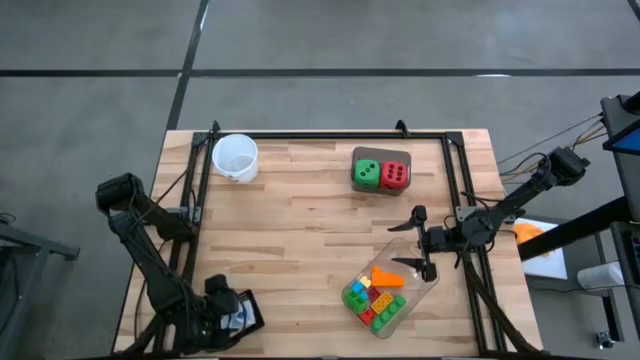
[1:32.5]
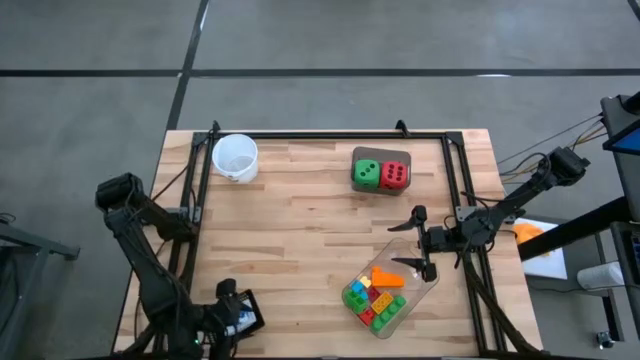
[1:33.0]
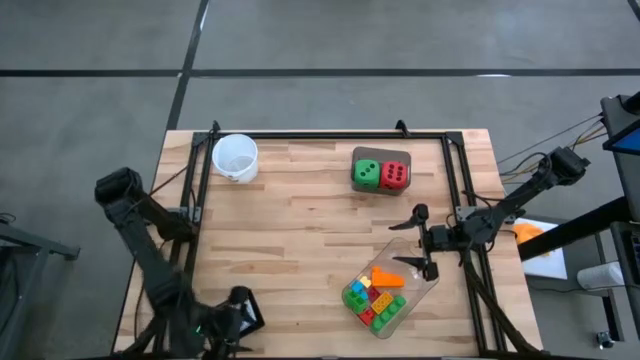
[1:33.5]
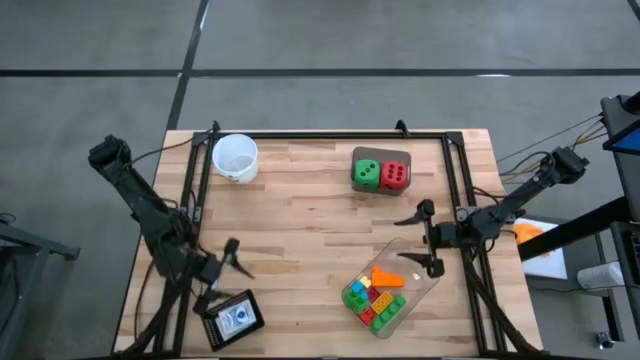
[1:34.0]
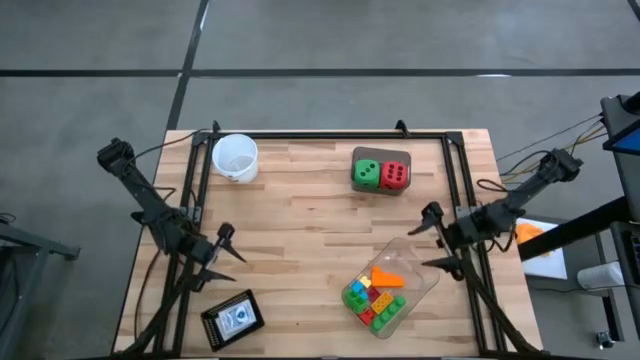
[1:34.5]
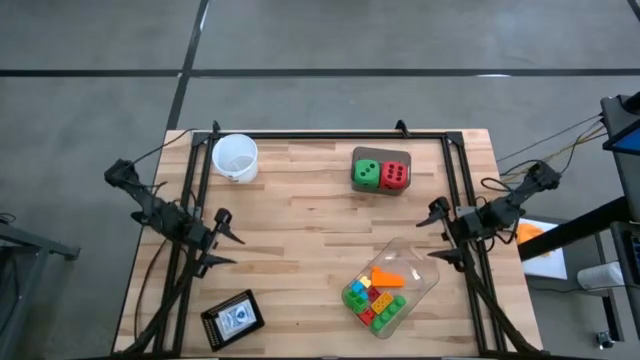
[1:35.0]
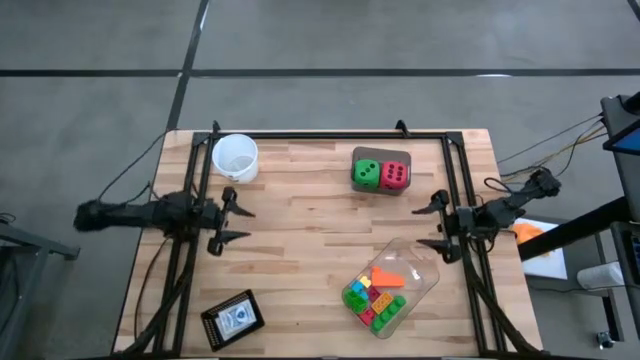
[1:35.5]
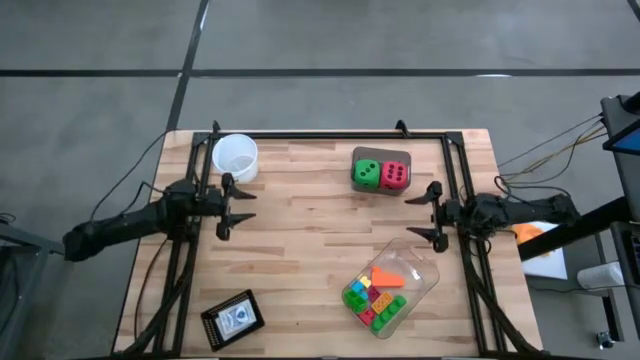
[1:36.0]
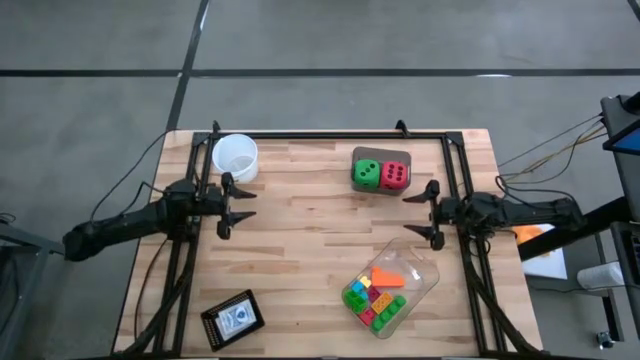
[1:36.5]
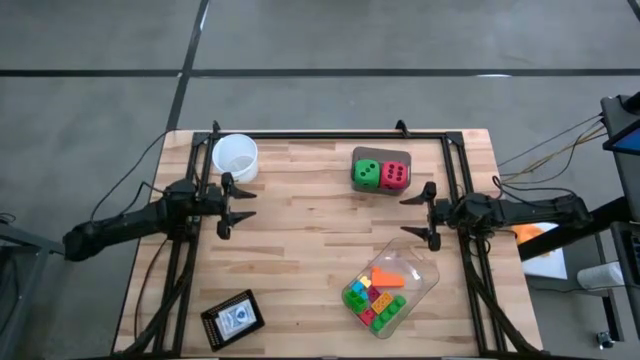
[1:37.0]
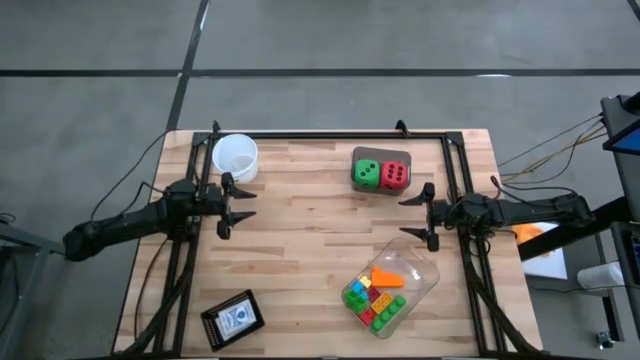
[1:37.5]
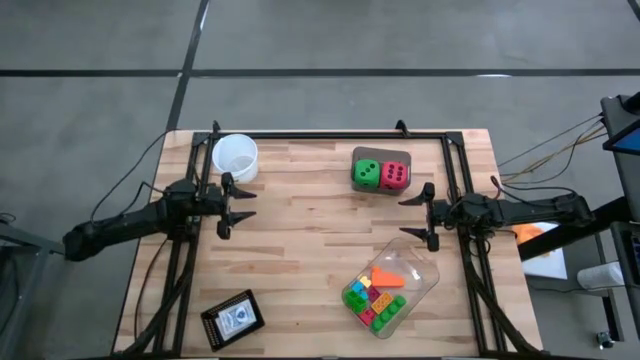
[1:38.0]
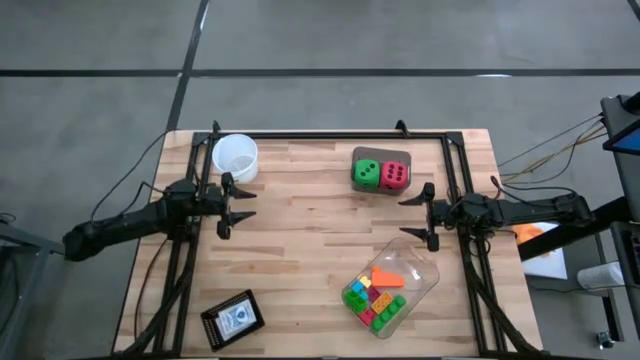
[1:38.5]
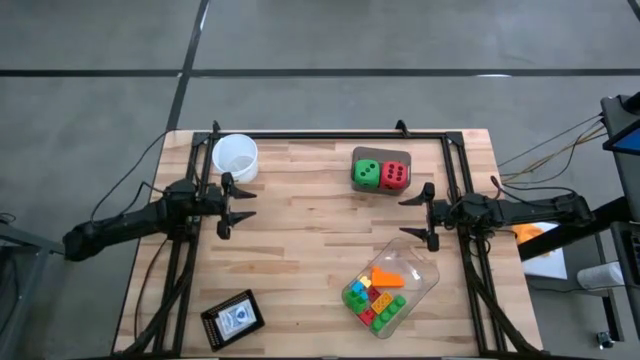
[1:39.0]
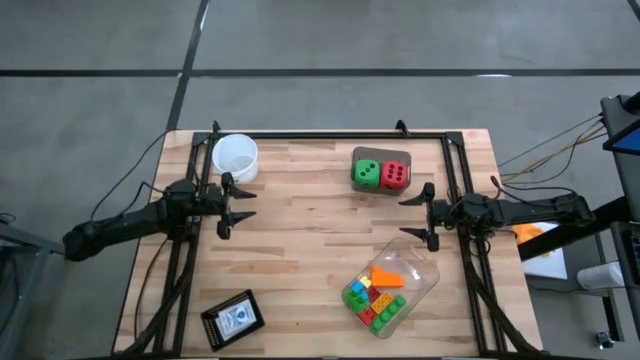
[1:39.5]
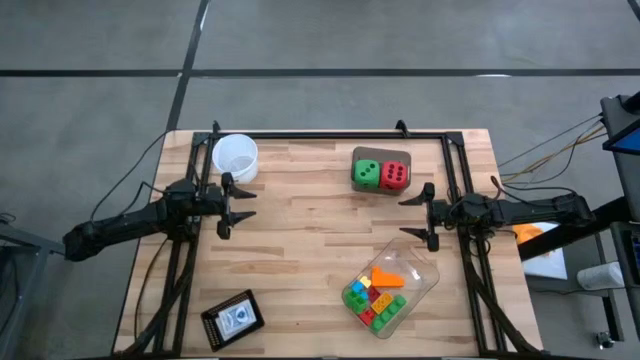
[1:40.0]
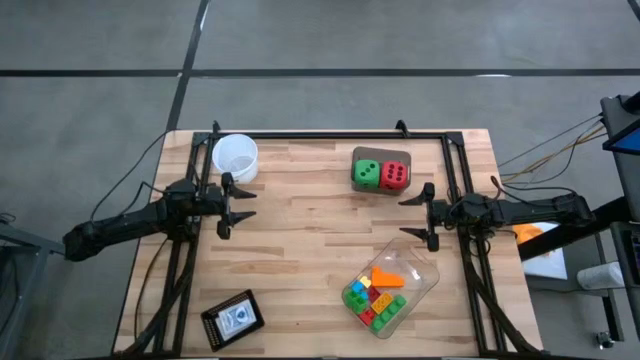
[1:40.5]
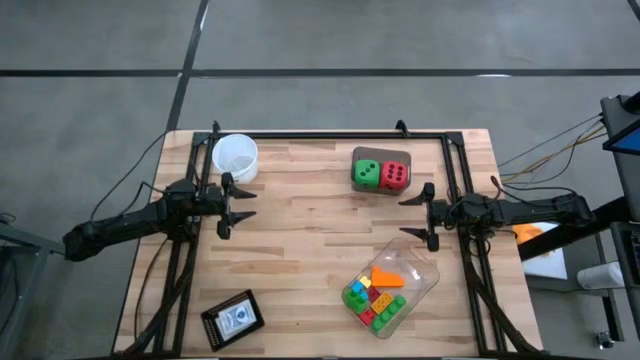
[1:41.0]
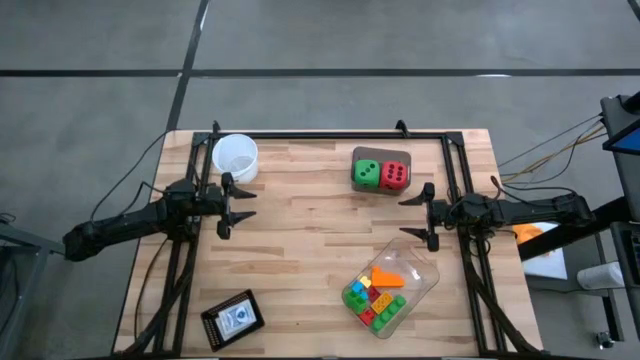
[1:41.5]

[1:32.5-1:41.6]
Task: Pick & Place Toys
Return to Home Position

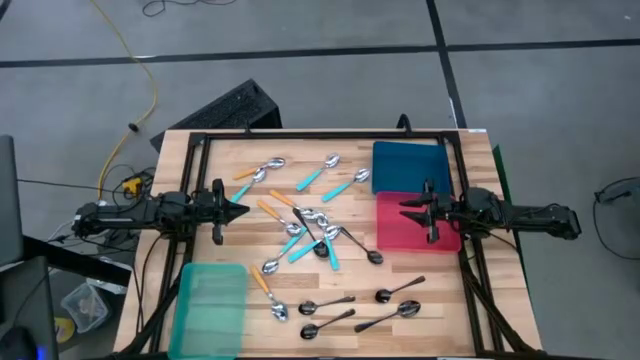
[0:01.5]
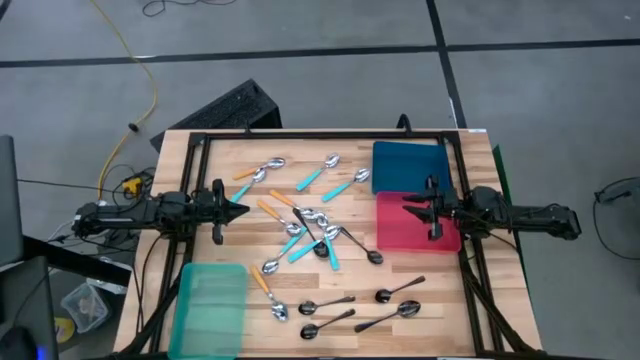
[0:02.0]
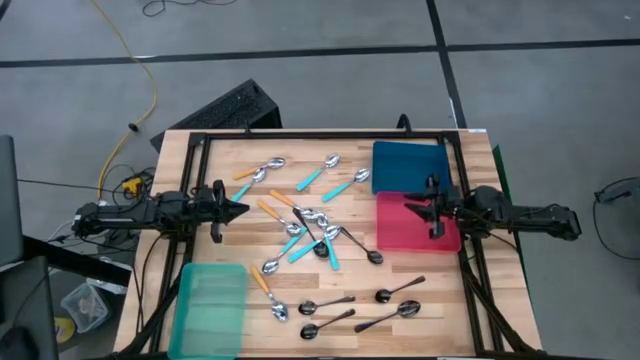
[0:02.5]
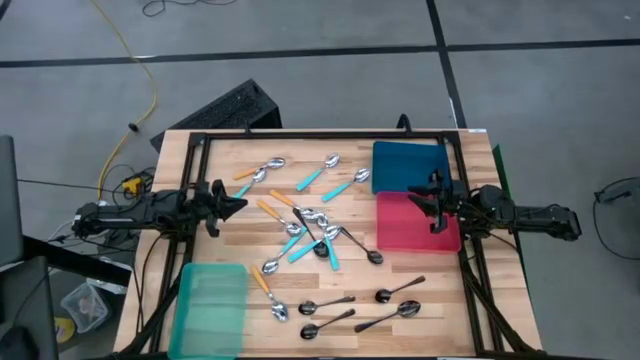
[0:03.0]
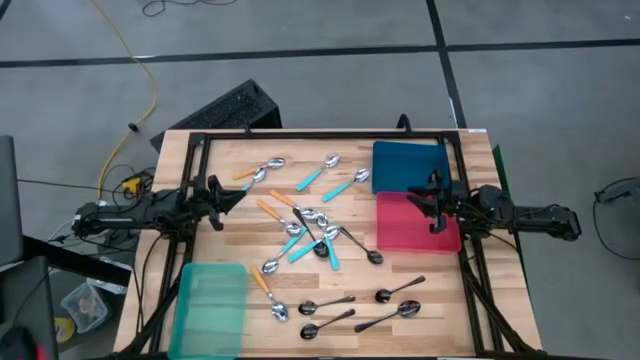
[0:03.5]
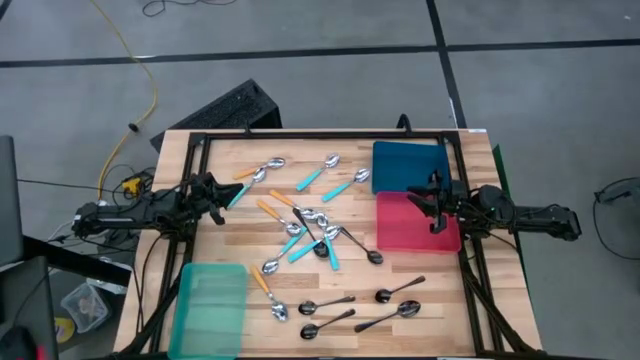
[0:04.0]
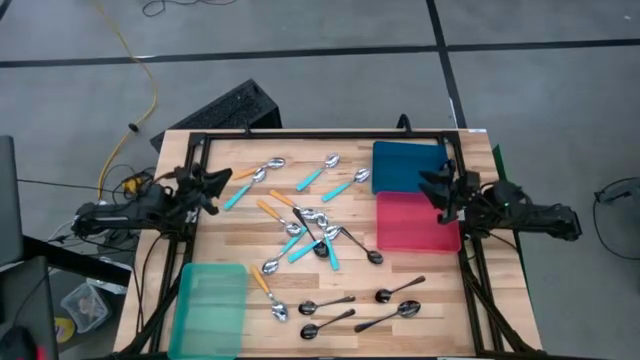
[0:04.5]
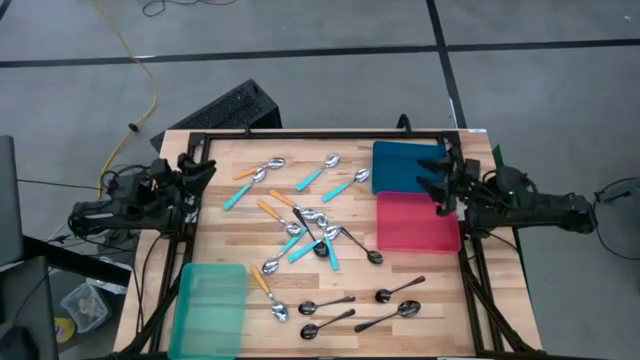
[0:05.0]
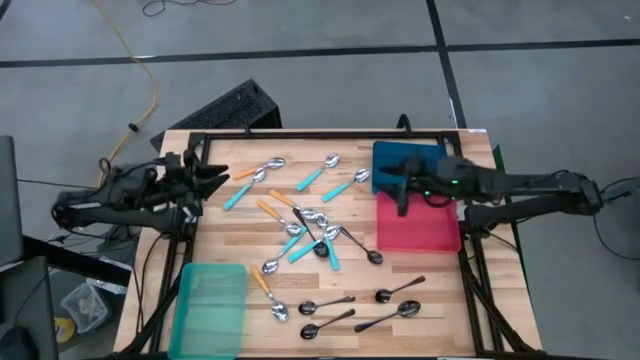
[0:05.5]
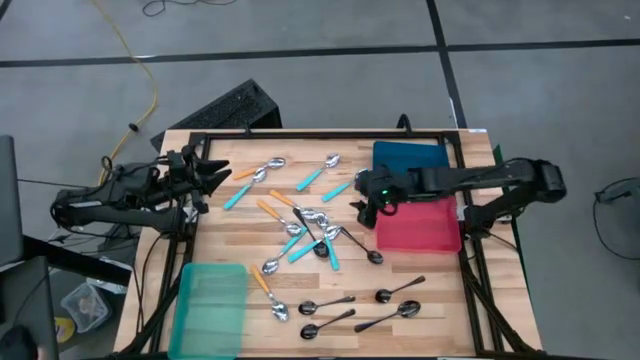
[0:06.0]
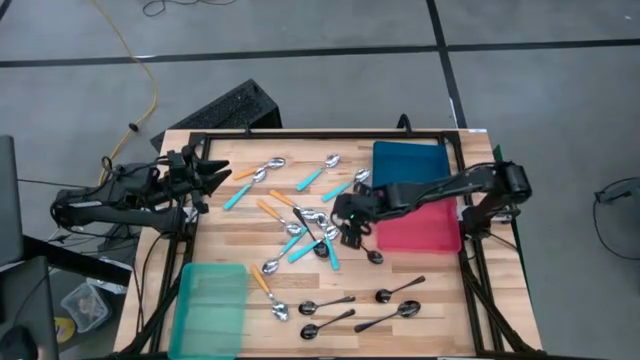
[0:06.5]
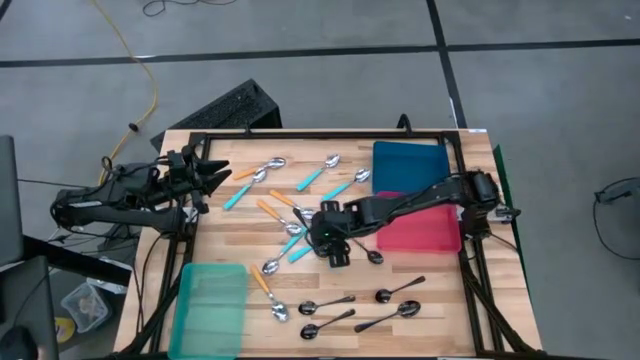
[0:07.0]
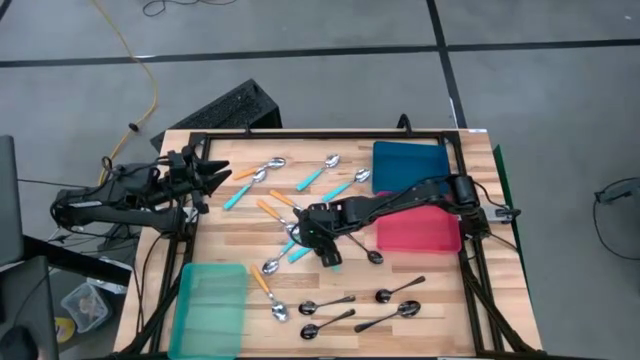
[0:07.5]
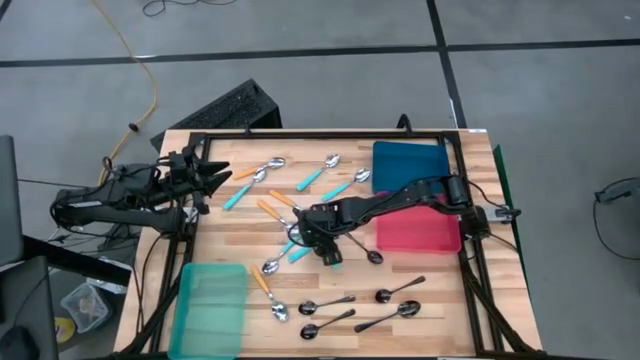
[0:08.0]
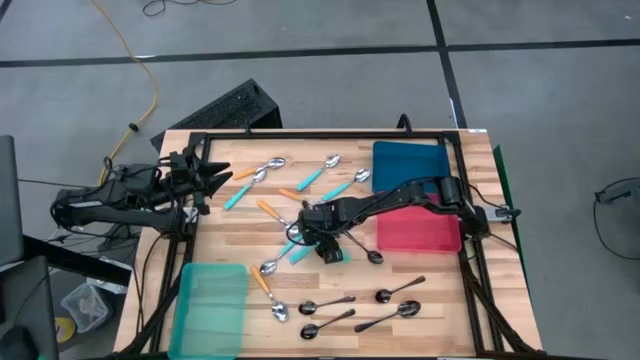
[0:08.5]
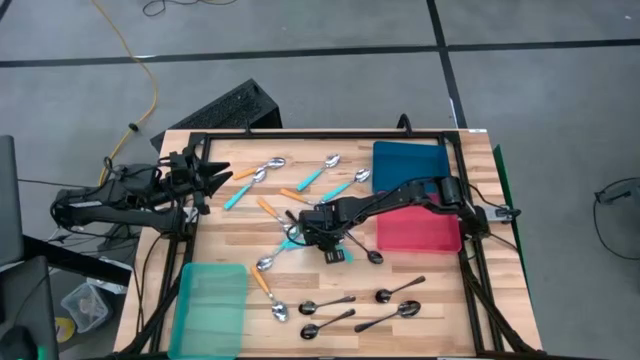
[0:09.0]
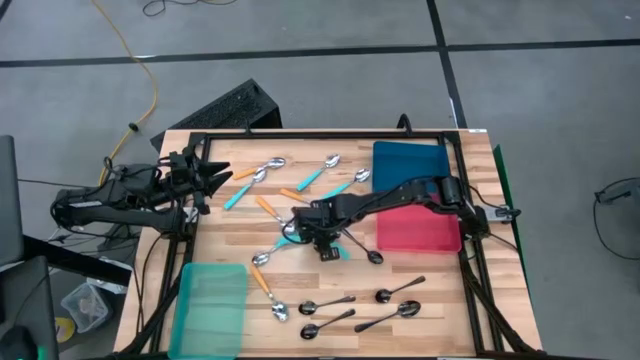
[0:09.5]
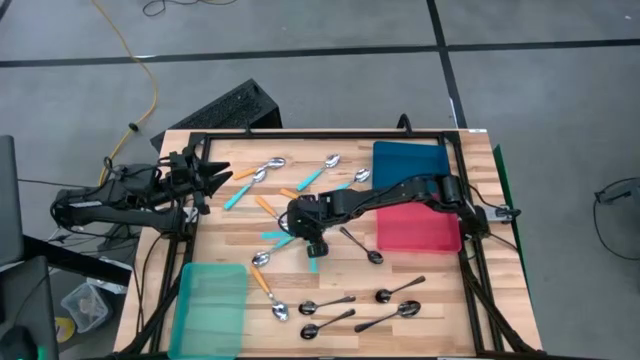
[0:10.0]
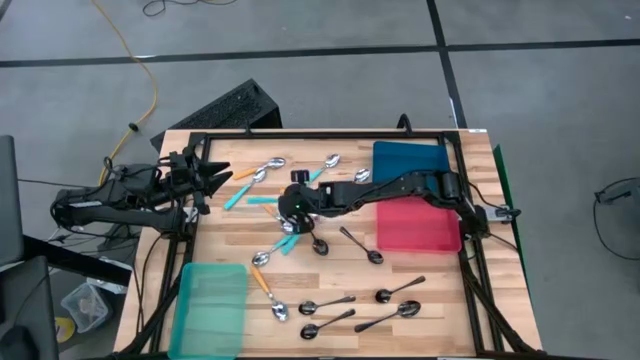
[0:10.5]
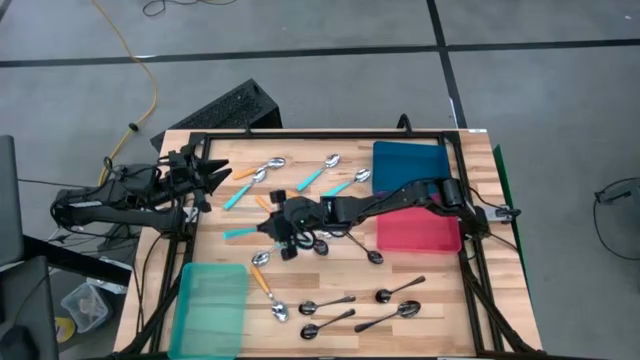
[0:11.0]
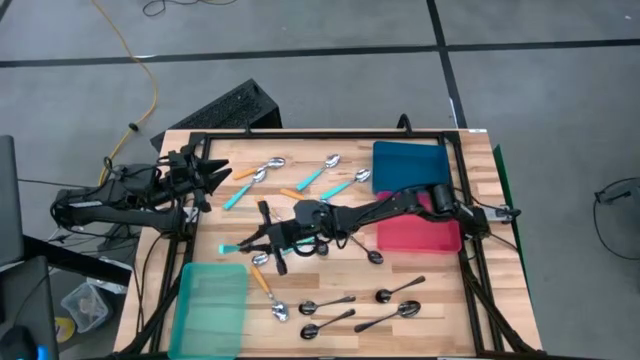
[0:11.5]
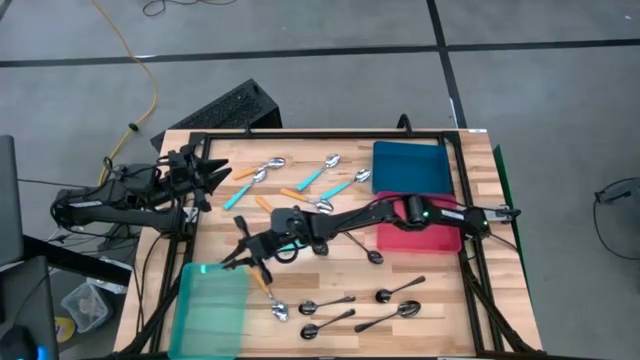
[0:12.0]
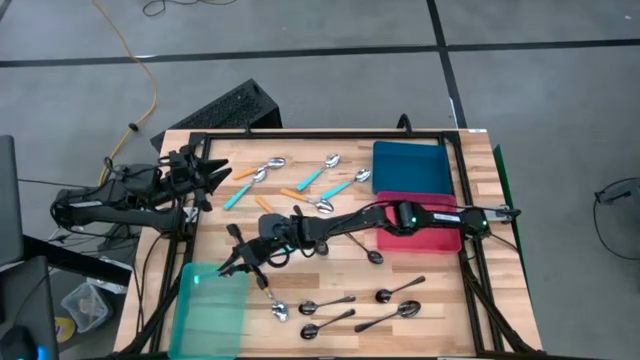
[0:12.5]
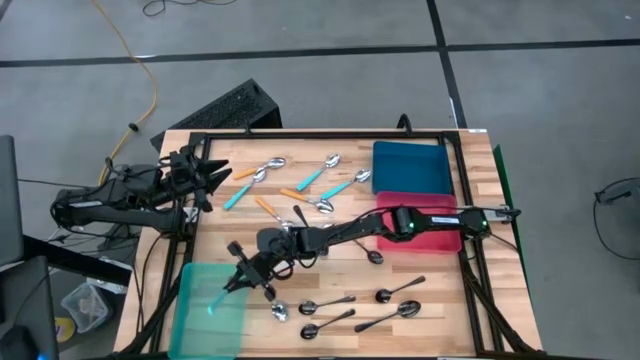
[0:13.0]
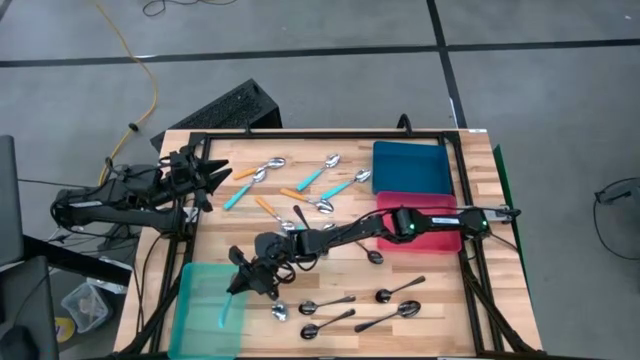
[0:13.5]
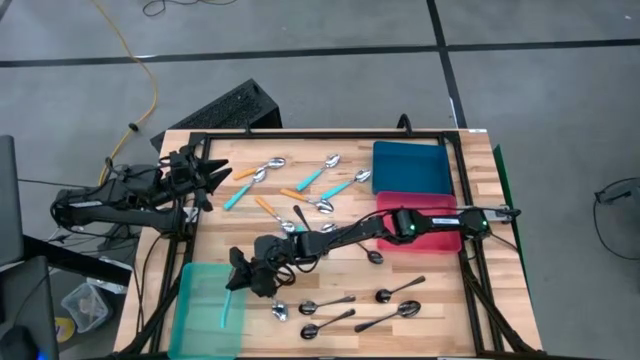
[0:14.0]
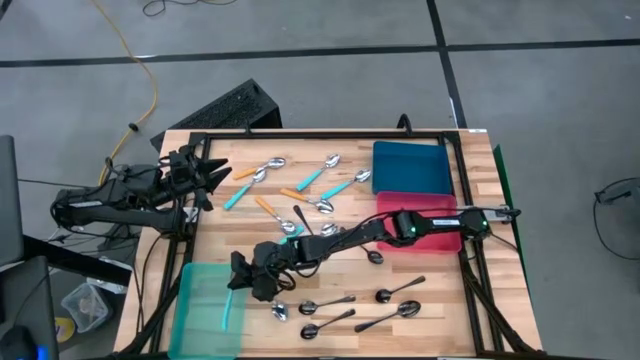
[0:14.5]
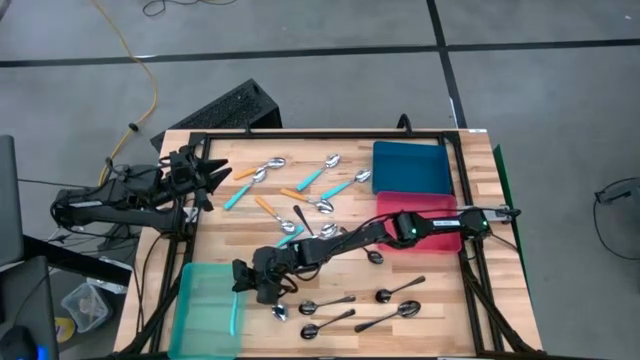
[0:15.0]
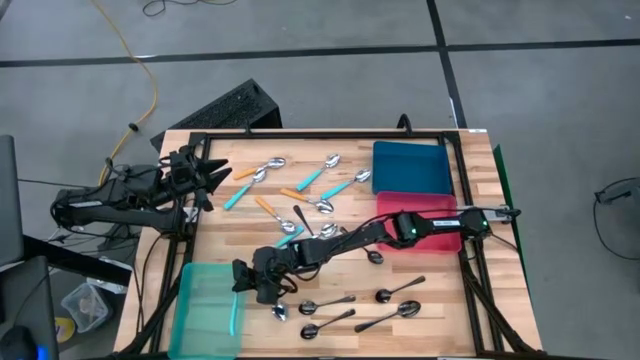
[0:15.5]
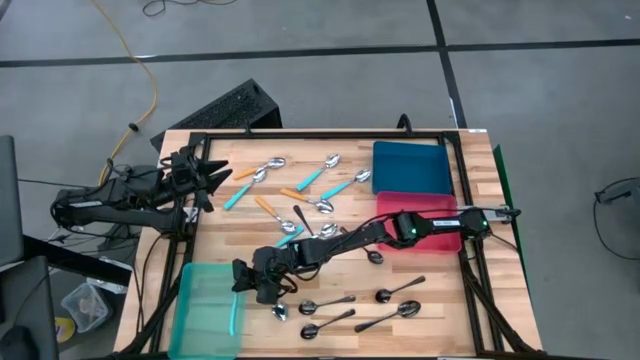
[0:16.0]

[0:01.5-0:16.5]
Task: Sort silverware by color (type)
Put the blue spoon into the skyblue bin
